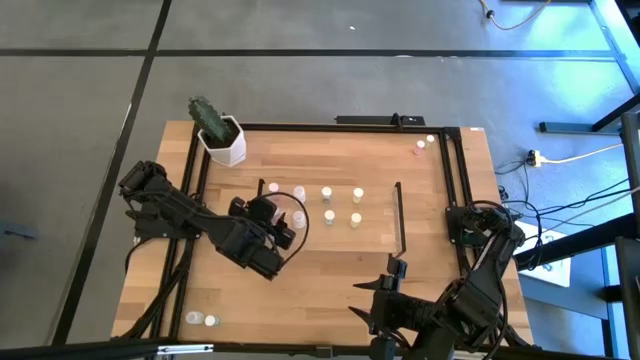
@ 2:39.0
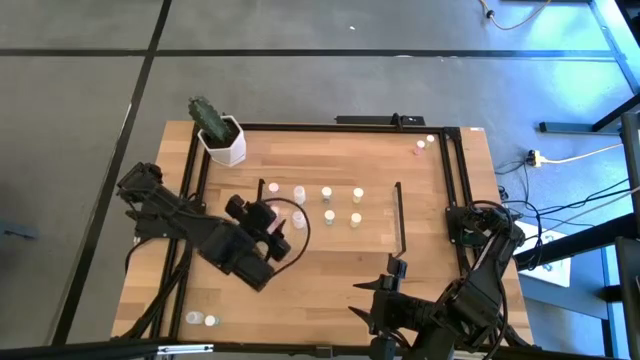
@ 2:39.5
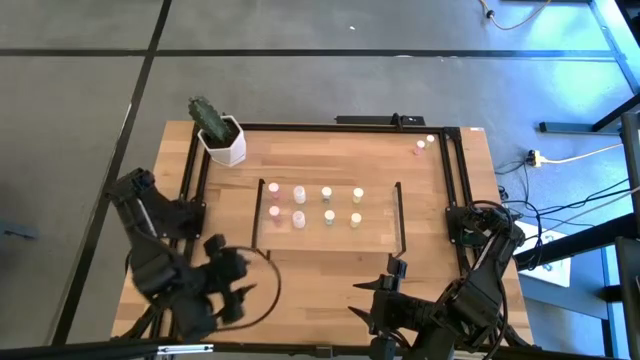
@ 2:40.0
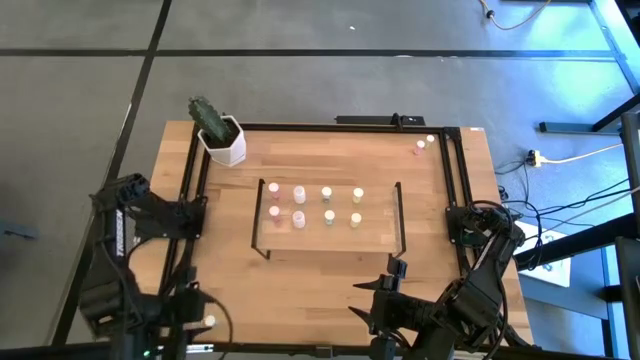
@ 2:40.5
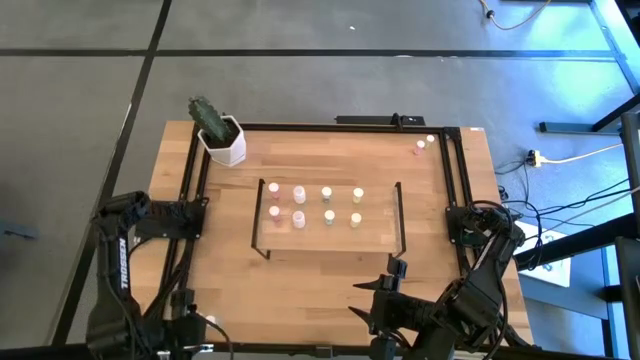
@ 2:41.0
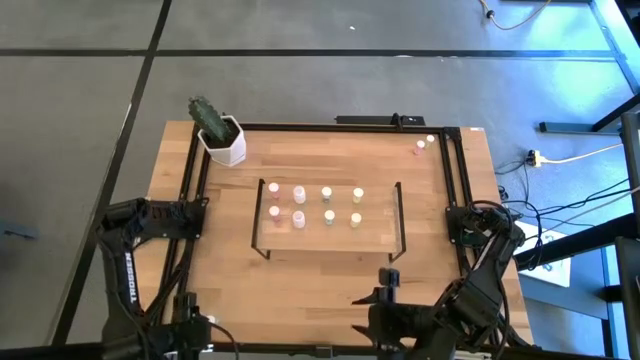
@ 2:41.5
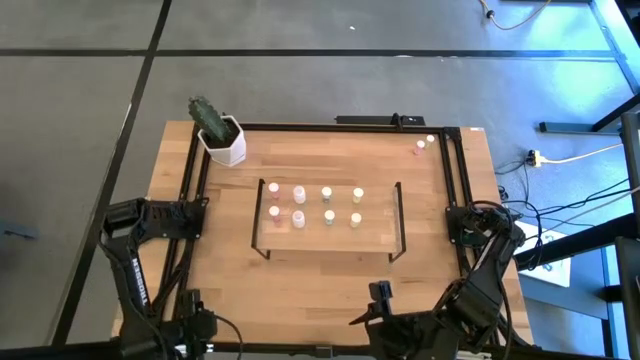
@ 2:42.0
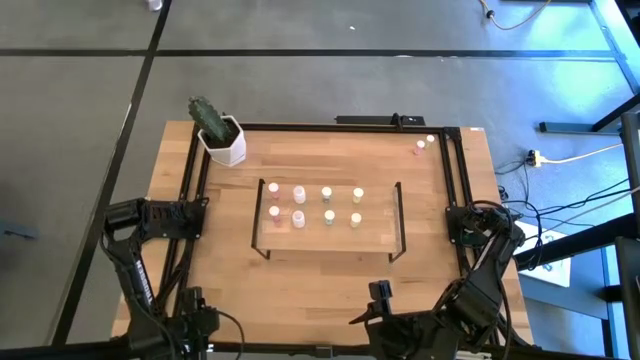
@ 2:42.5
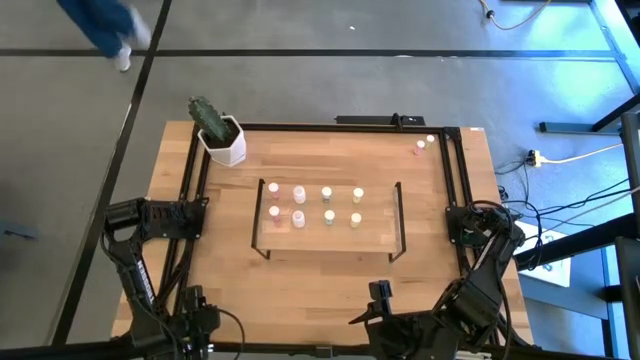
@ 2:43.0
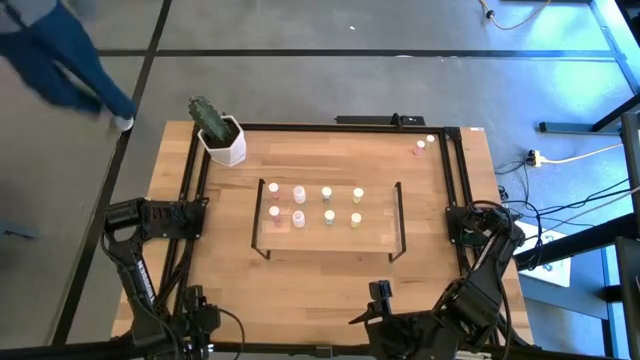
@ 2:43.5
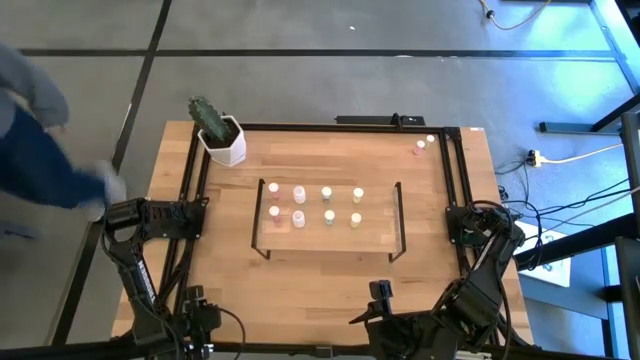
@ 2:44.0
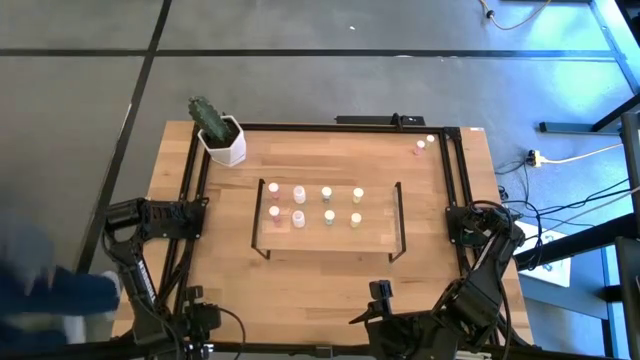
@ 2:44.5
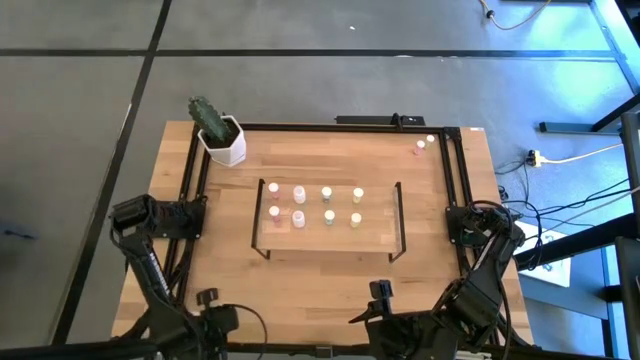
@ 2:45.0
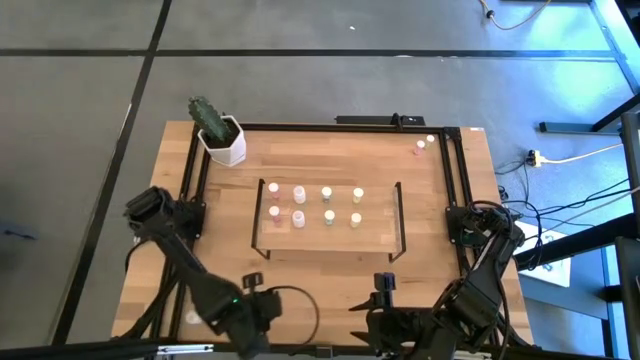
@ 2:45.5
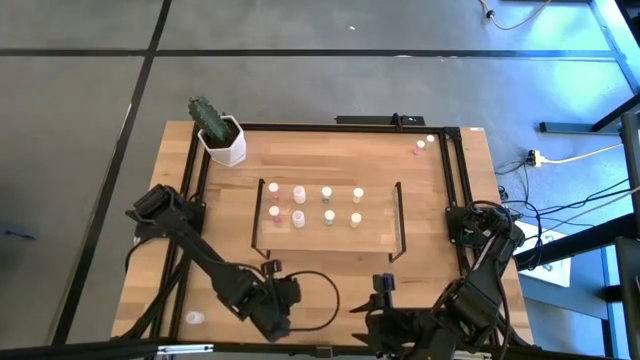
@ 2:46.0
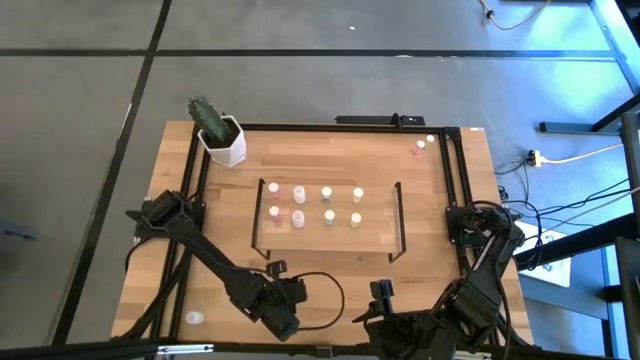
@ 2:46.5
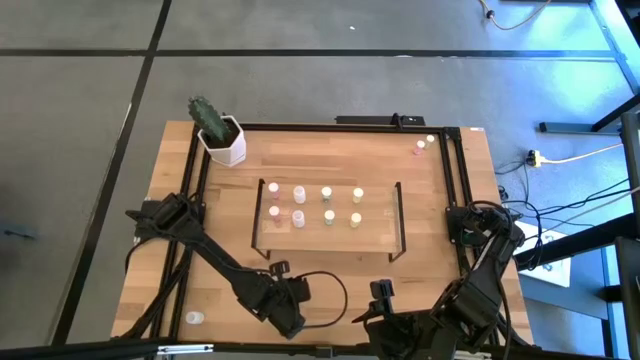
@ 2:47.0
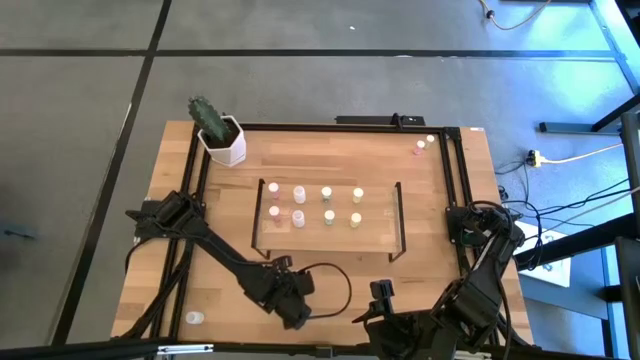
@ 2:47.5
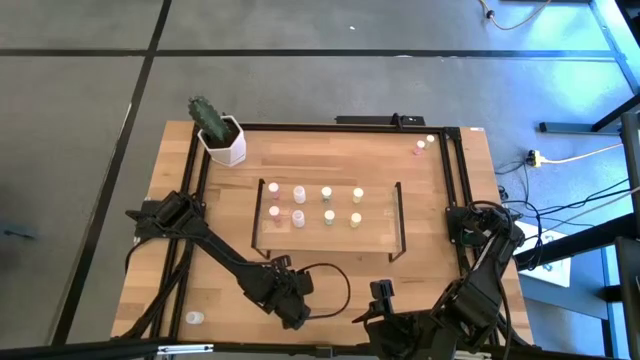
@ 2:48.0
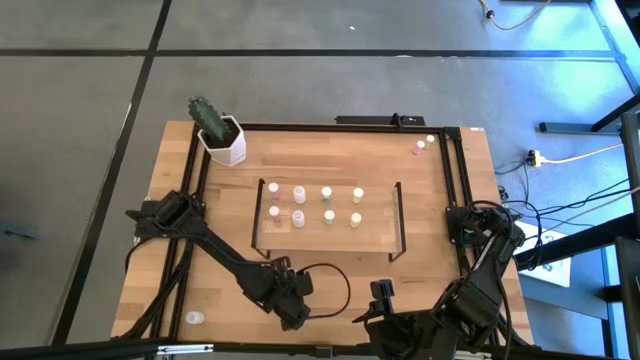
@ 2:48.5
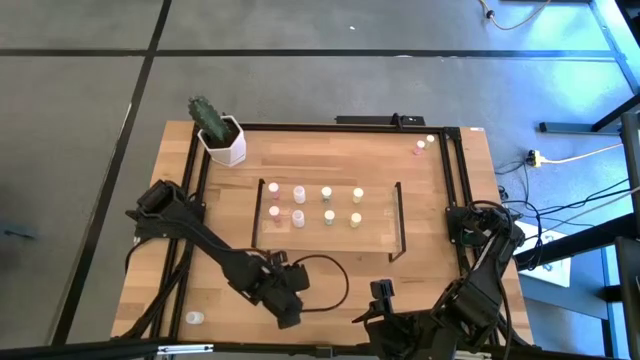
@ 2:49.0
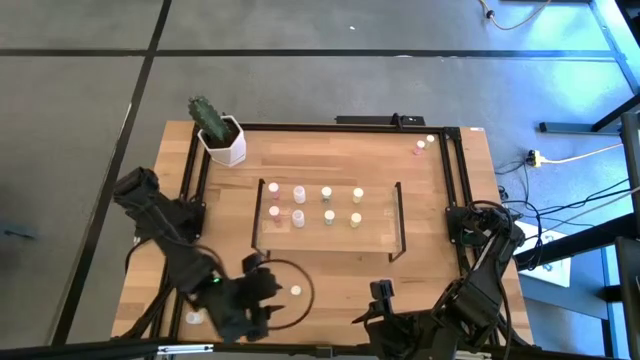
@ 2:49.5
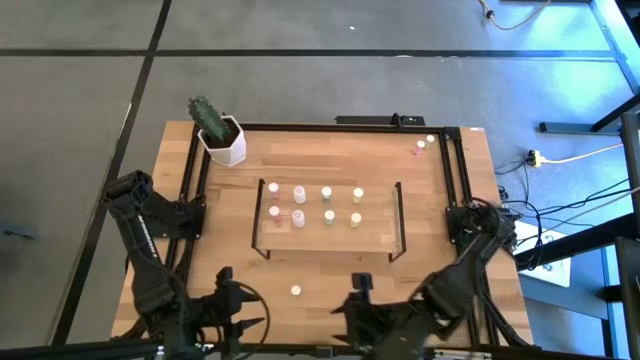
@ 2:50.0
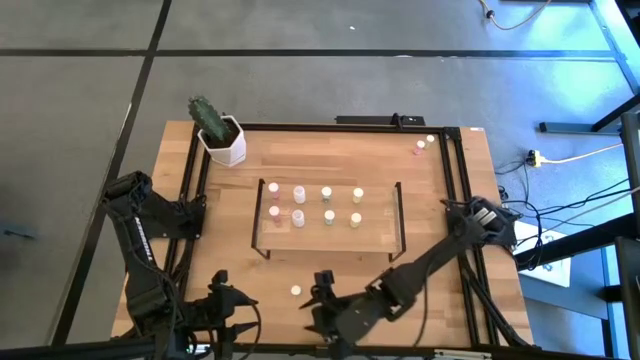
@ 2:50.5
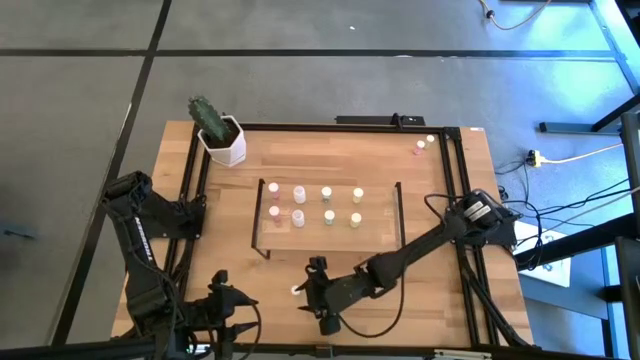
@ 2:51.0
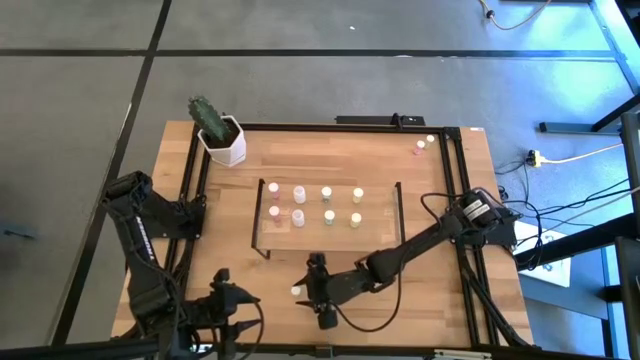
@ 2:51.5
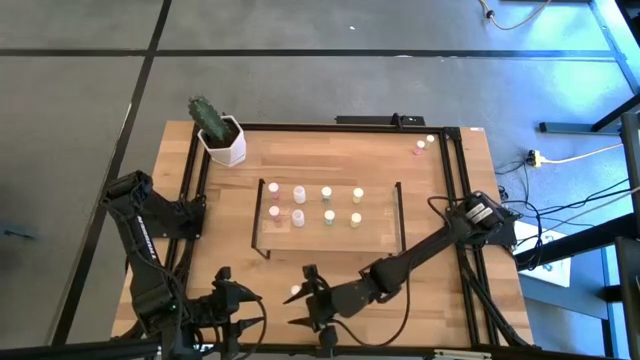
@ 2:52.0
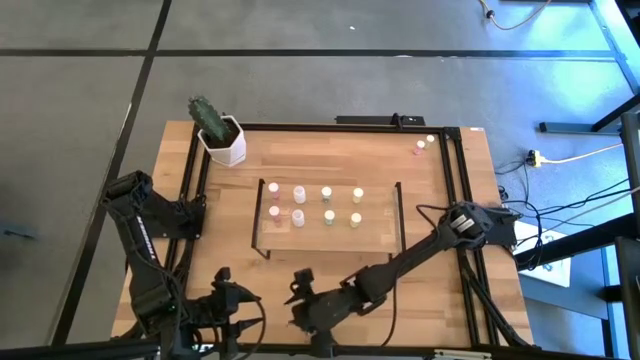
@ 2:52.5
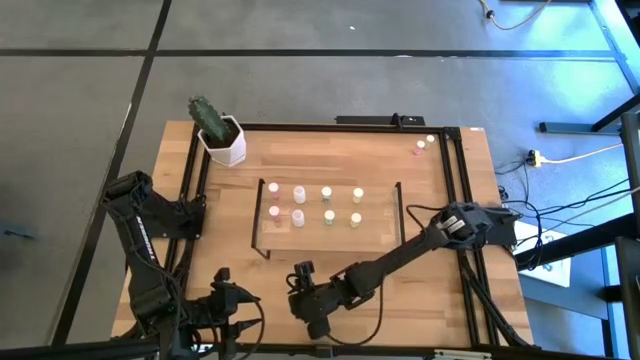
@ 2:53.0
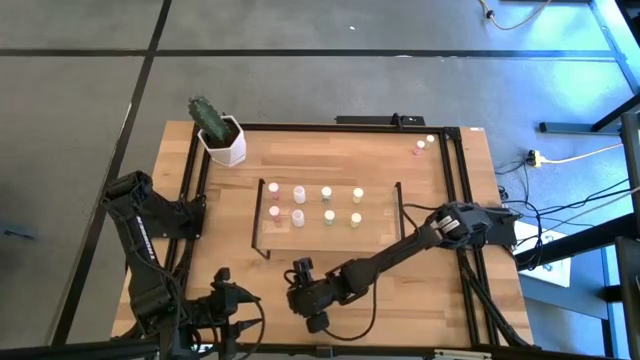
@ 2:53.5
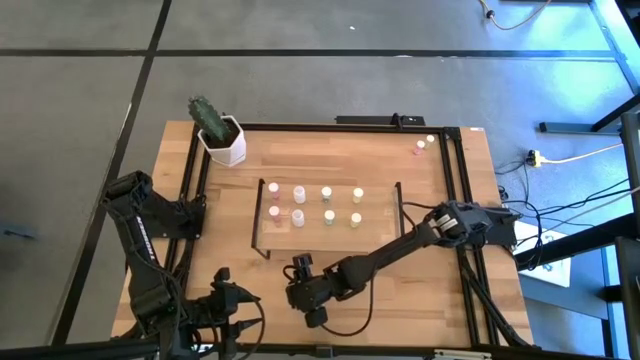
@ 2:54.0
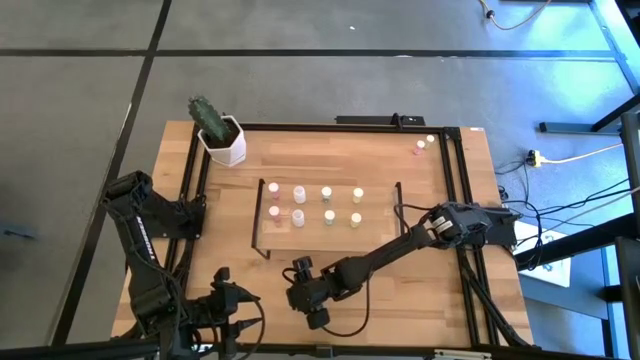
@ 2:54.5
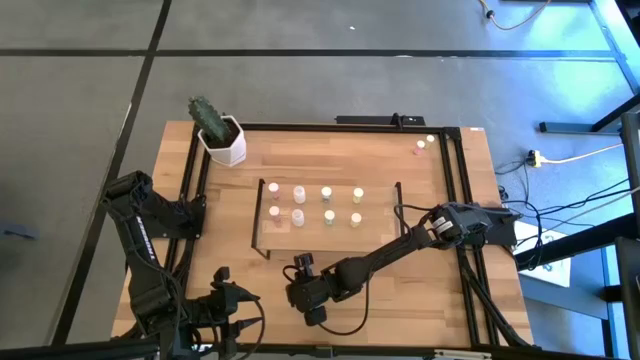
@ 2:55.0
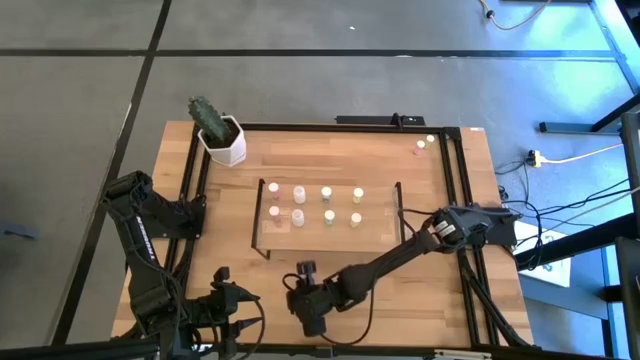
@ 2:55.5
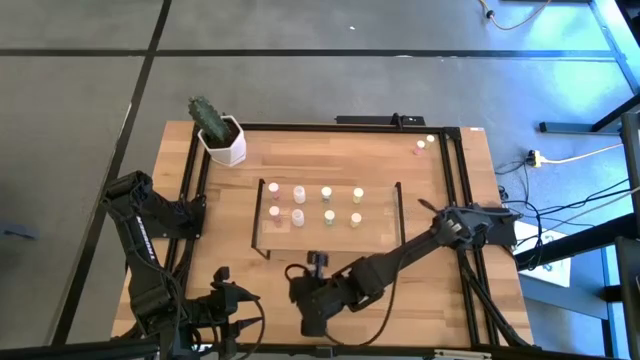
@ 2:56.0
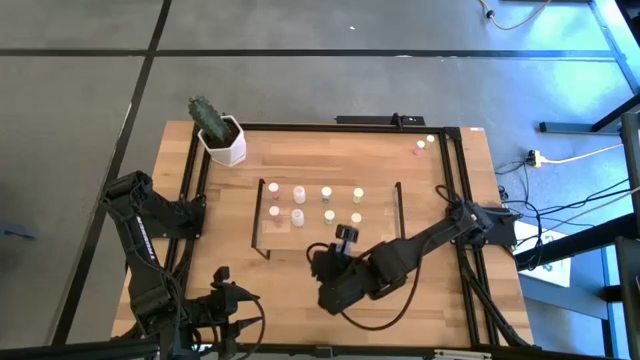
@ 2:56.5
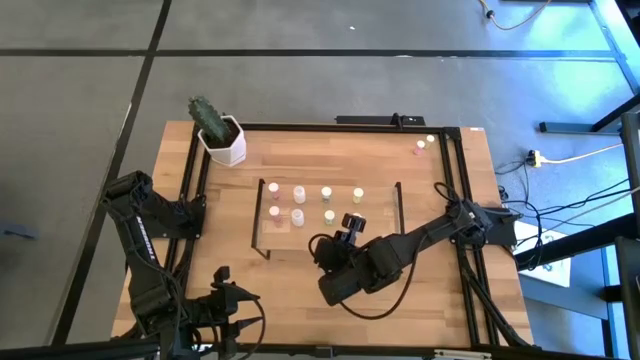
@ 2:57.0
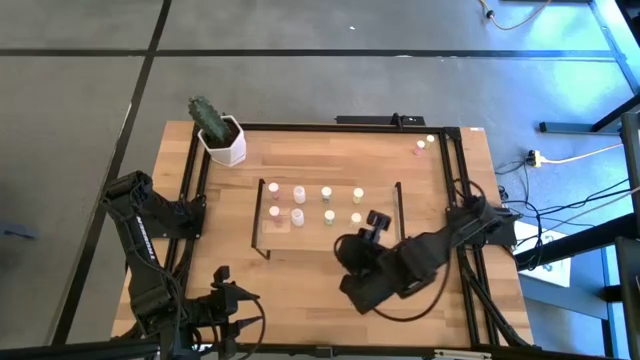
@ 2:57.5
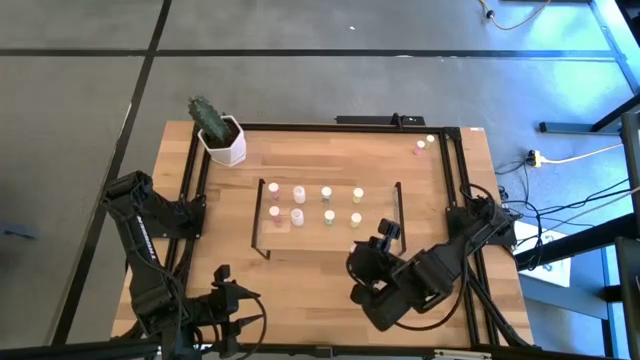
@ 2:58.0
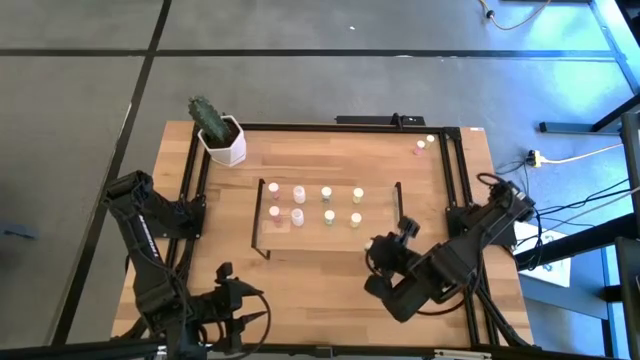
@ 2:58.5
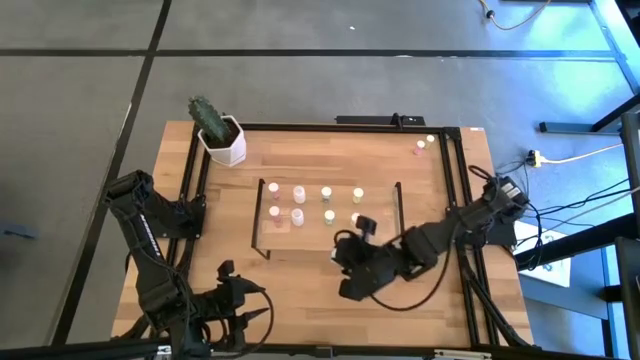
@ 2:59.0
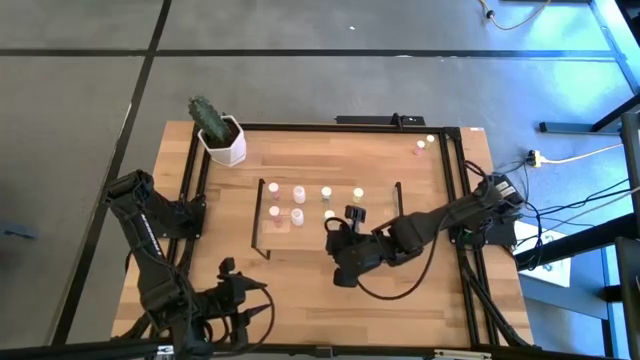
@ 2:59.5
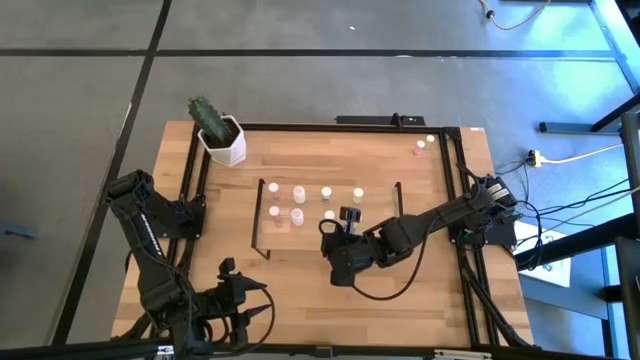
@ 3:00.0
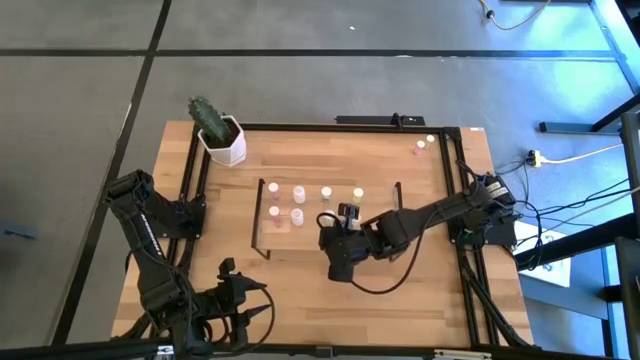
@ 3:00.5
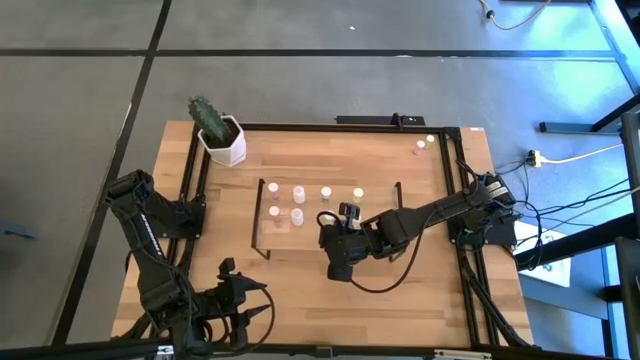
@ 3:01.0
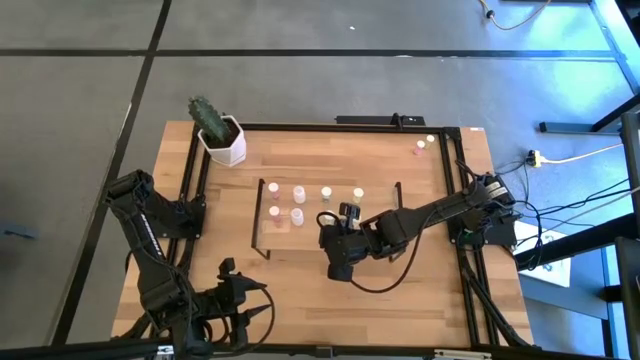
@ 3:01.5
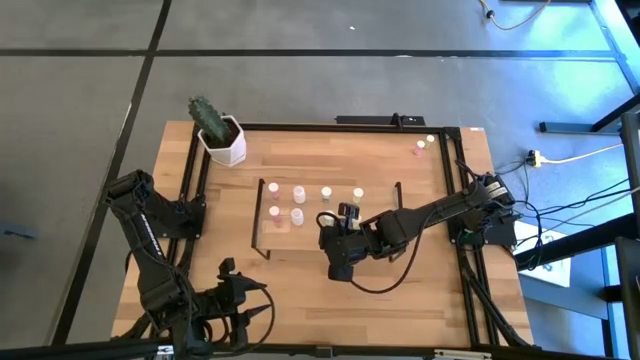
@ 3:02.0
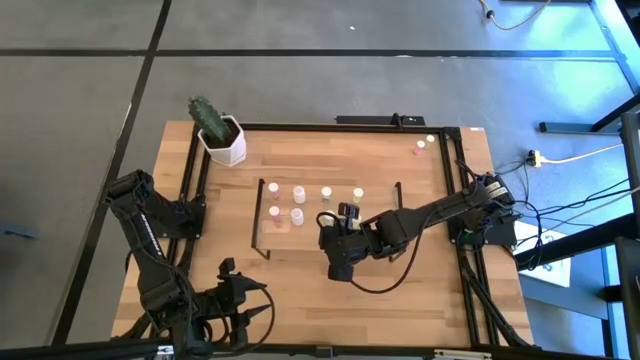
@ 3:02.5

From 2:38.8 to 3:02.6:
Task: Pick and place medicine bottles onto shelf by color
Put the blue pill bottle on the shelf aligned with the other blue pill bottles
